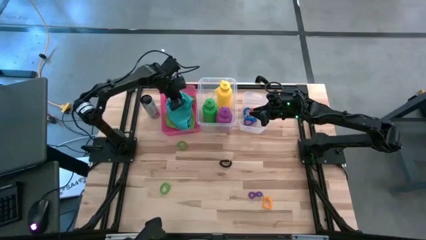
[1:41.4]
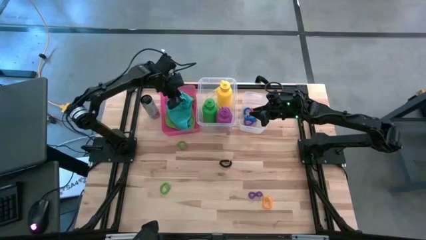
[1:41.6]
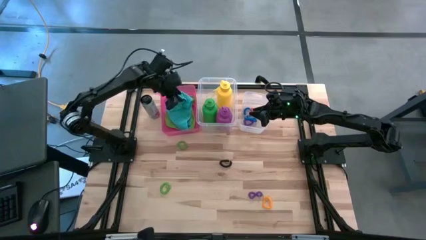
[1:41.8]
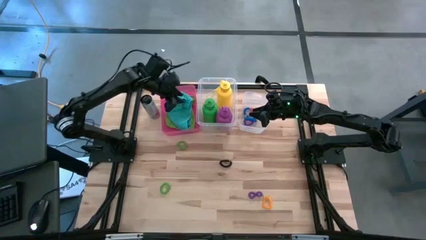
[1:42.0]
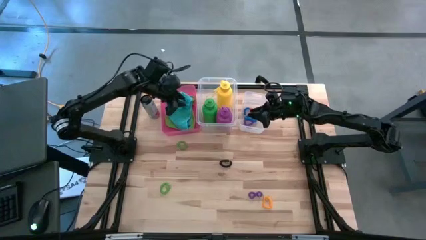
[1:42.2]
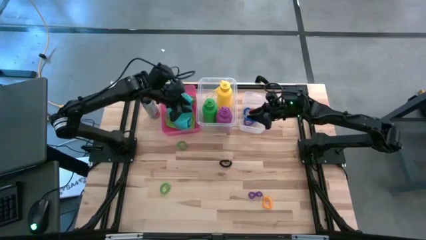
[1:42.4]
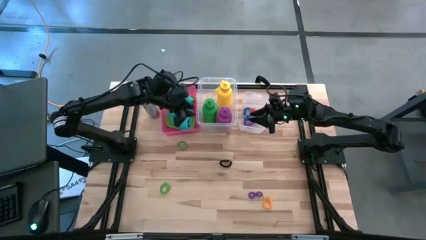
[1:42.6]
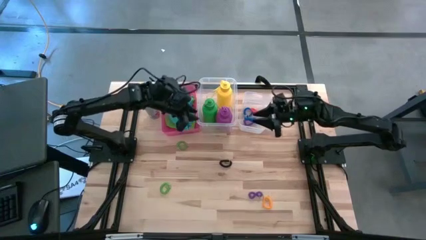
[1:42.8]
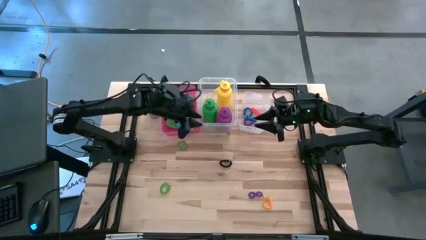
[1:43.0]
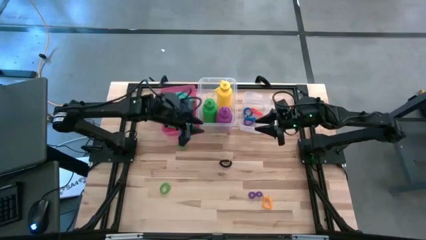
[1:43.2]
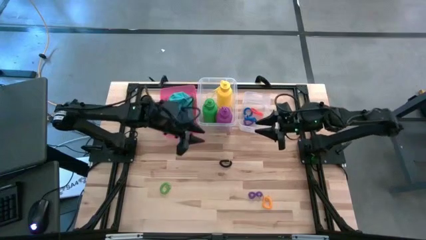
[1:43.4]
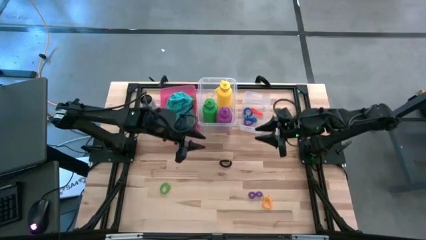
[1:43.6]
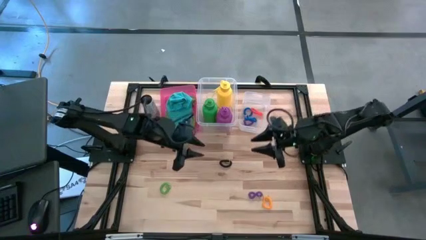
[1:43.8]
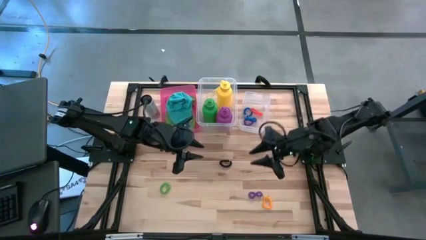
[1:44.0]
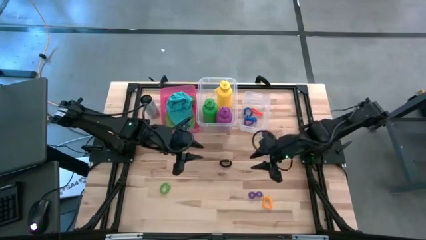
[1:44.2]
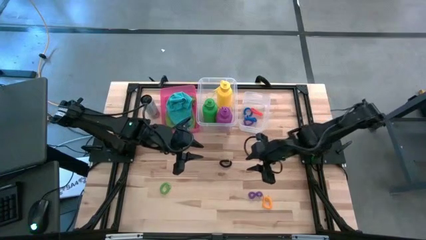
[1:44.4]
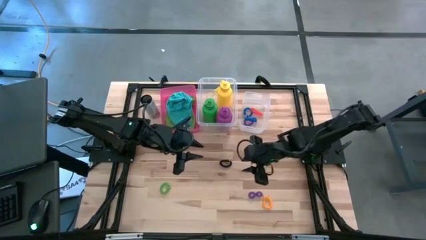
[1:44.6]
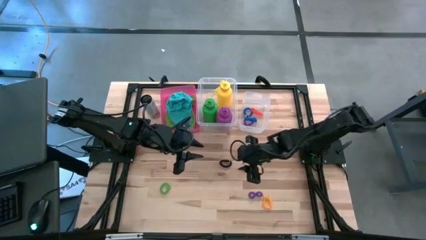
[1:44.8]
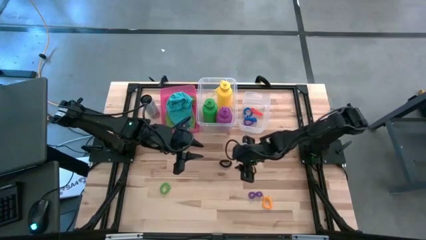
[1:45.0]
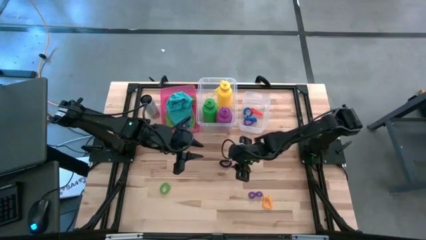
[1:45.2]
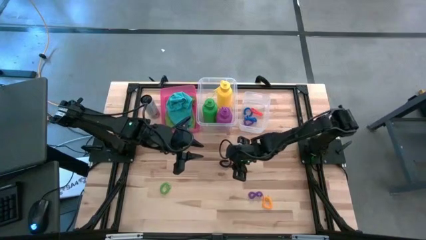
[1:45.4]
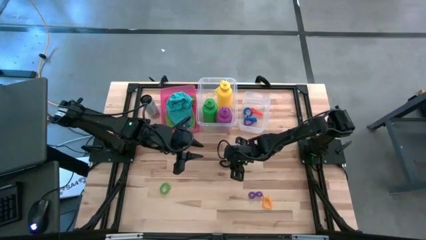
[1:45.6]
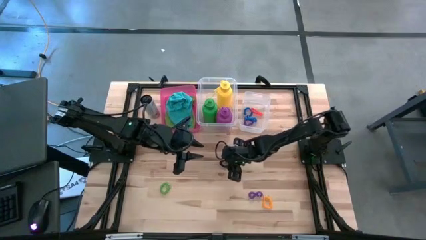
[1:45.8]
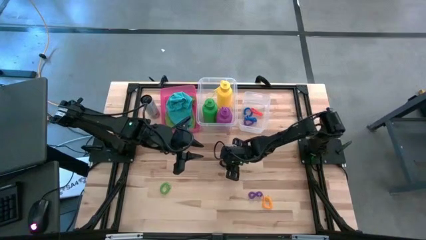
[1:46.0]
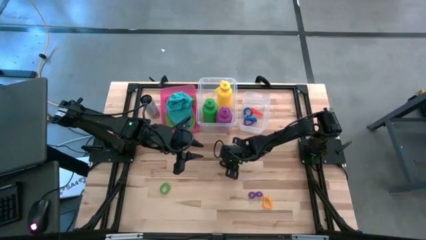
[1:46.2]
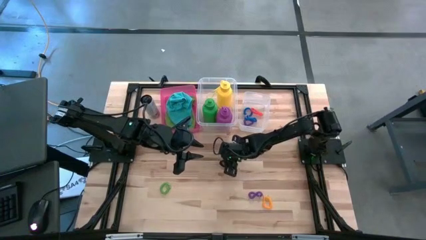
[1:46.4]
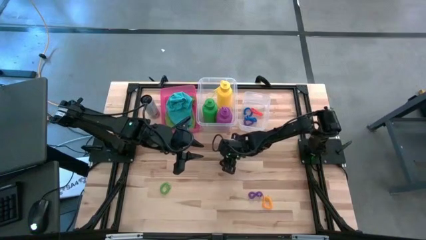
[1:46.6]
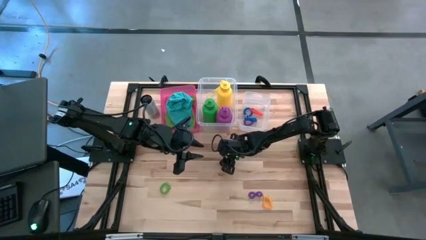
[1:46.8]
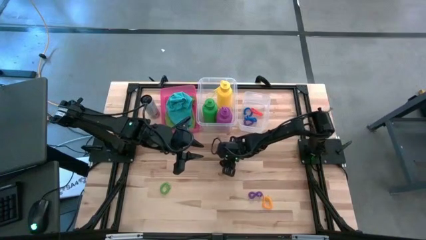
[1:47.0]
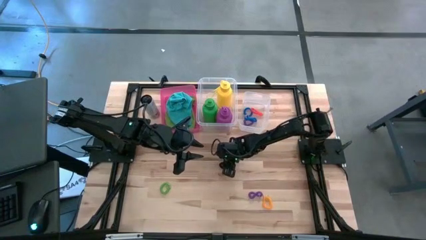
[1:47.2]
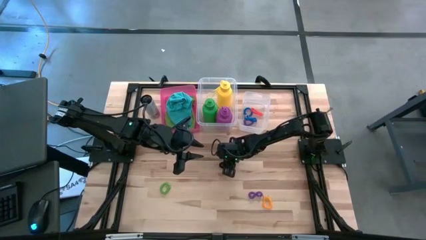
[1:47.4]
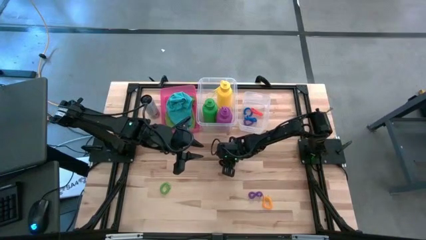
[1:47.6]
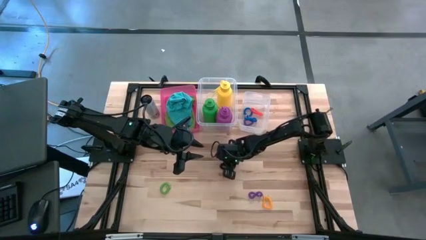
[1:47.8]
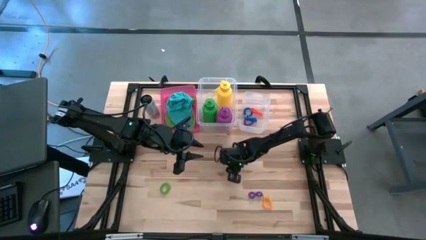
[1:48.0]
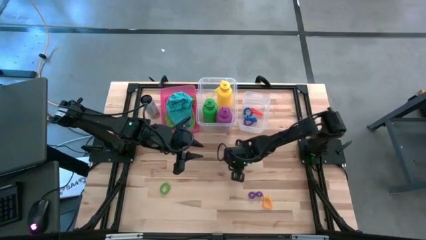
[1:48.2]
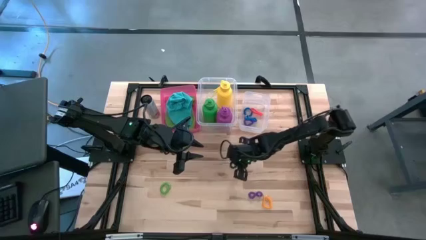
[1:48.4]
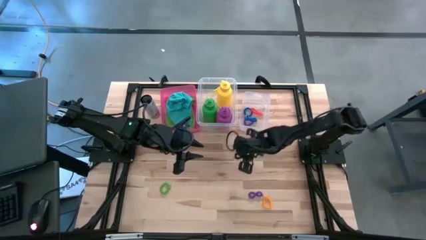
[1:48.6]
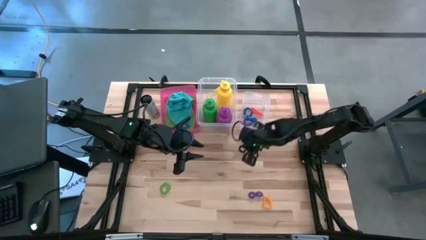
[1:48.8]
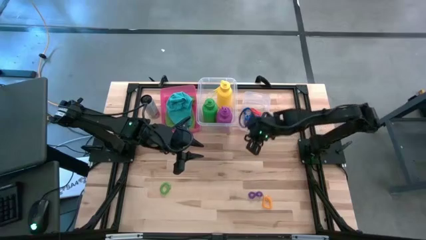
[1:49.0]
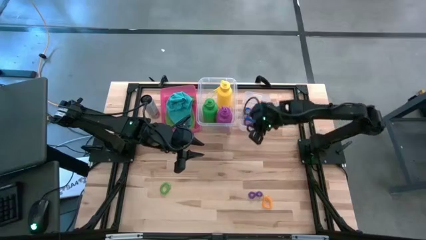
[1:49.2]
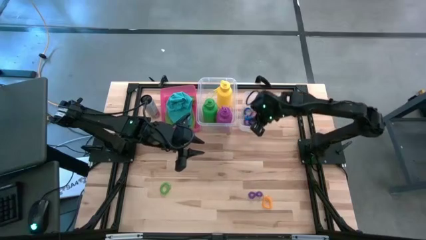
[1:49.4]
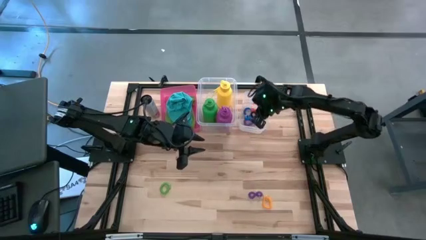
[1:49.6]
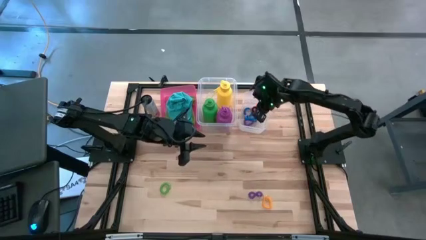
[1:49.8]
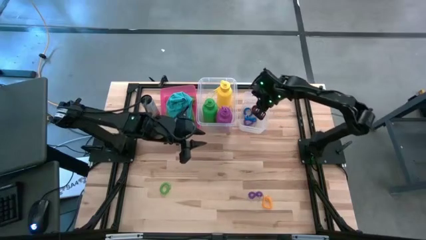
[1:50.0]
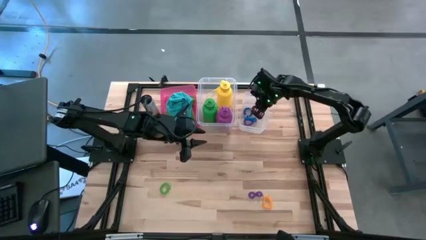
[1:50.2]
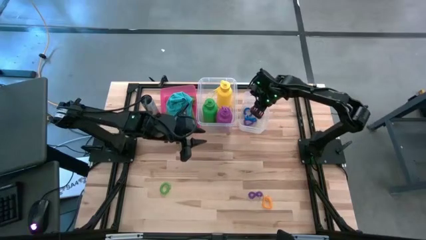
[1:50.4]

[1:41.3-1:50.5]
Task: Pick & Place Sports Items
Put the black spring keychain into the right transparent bin

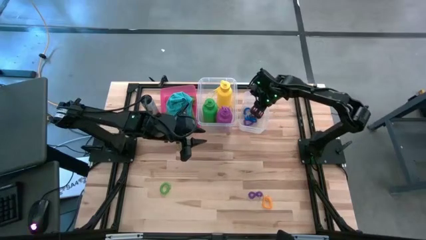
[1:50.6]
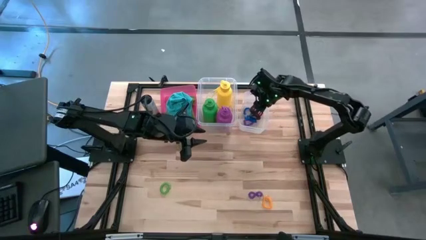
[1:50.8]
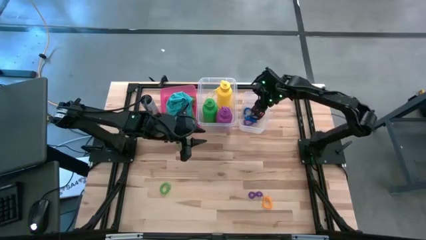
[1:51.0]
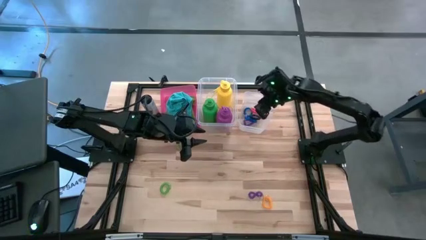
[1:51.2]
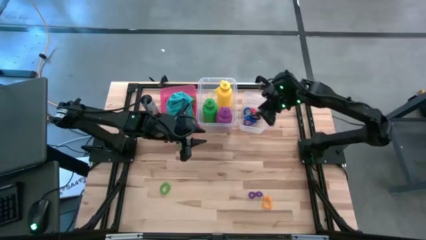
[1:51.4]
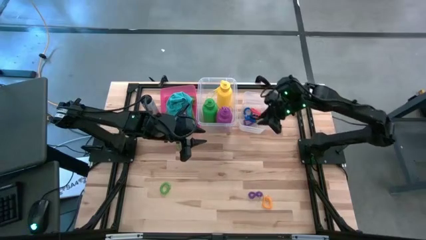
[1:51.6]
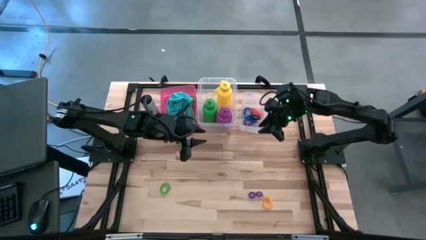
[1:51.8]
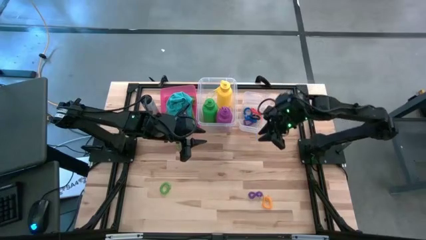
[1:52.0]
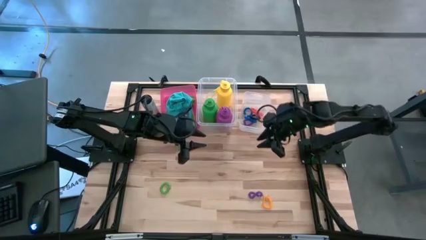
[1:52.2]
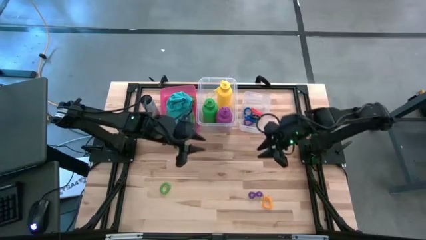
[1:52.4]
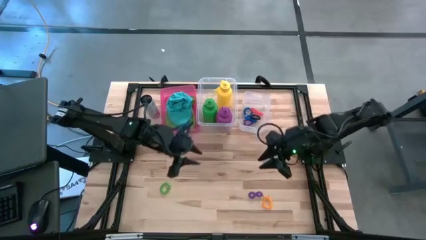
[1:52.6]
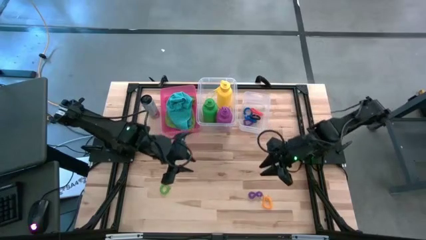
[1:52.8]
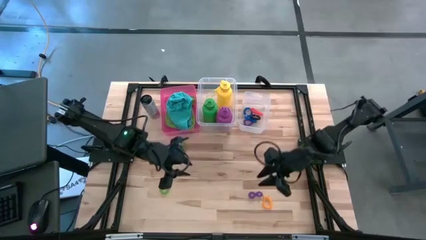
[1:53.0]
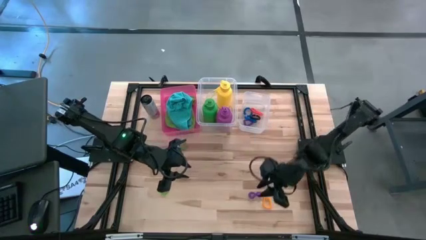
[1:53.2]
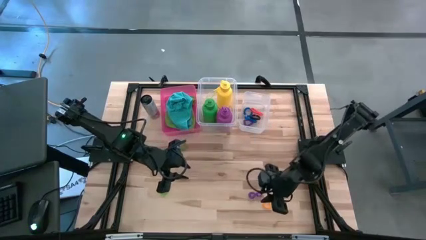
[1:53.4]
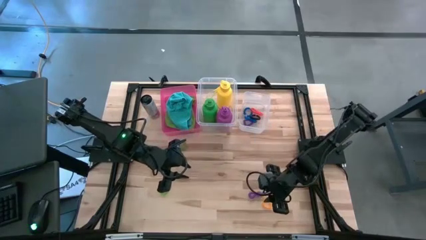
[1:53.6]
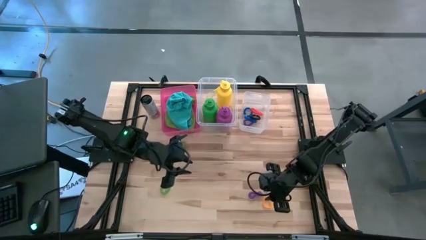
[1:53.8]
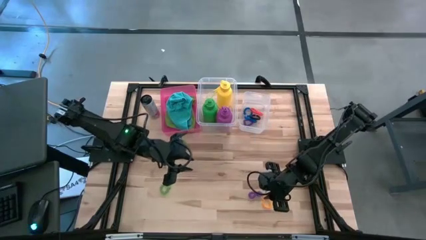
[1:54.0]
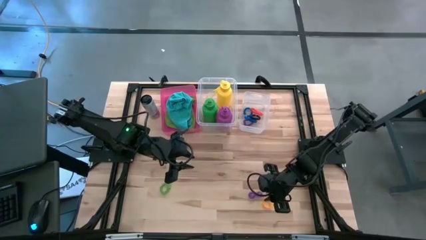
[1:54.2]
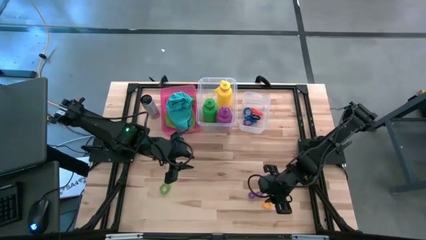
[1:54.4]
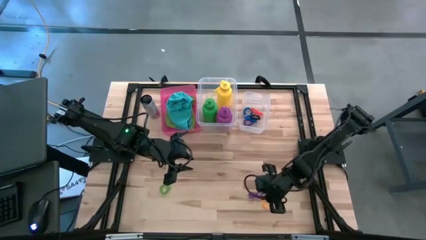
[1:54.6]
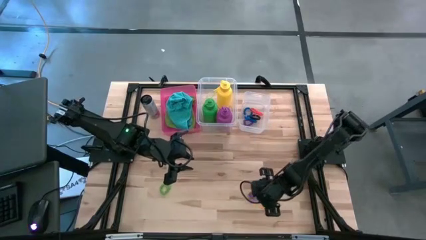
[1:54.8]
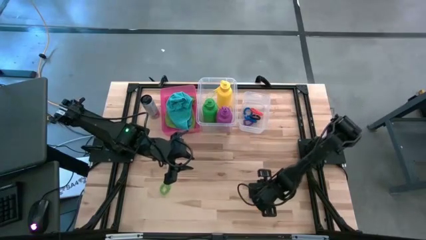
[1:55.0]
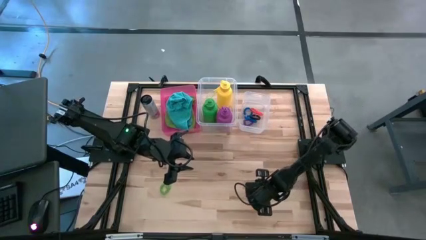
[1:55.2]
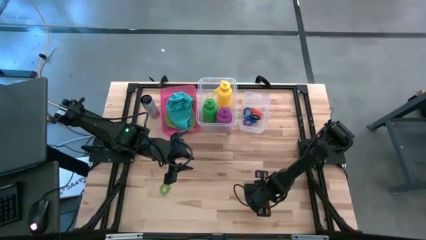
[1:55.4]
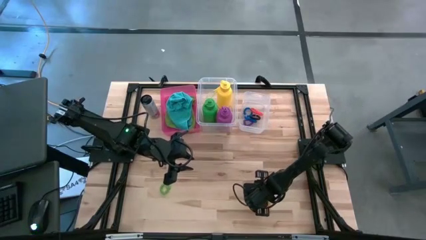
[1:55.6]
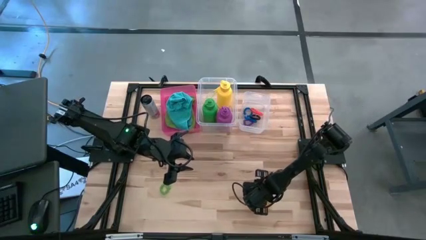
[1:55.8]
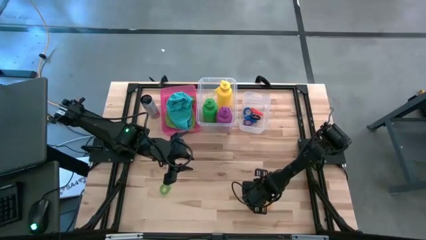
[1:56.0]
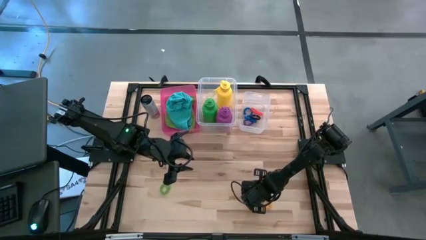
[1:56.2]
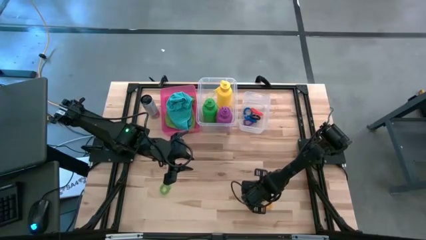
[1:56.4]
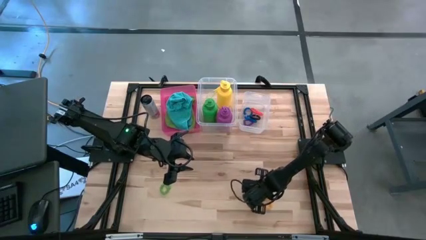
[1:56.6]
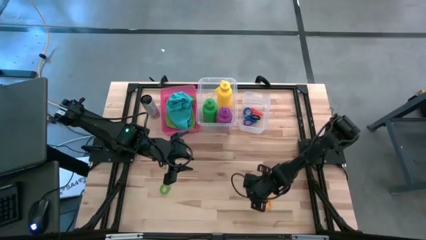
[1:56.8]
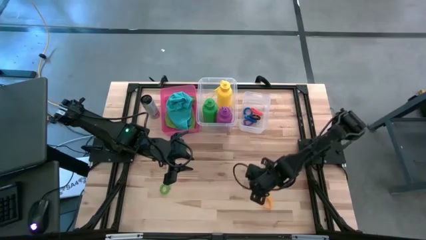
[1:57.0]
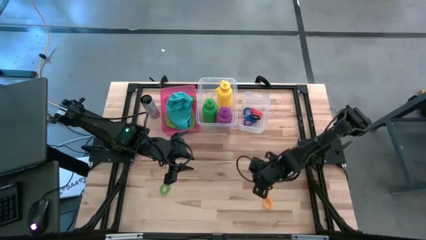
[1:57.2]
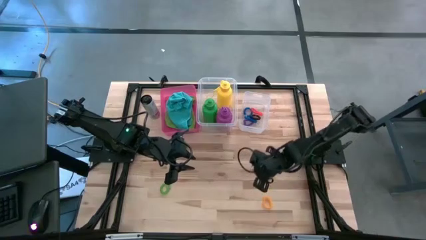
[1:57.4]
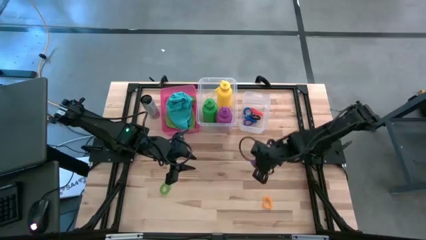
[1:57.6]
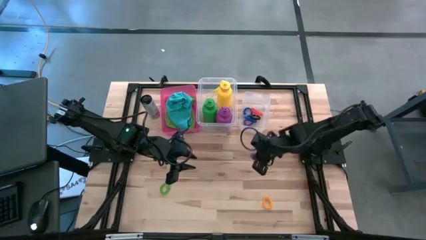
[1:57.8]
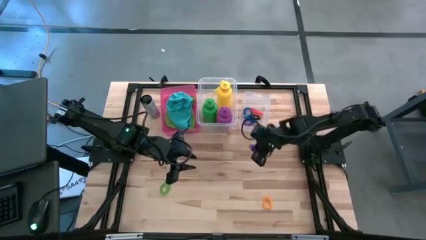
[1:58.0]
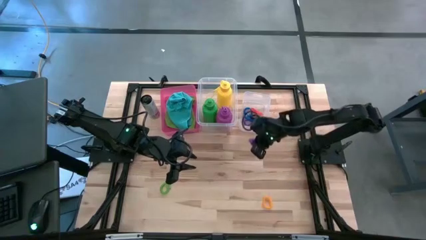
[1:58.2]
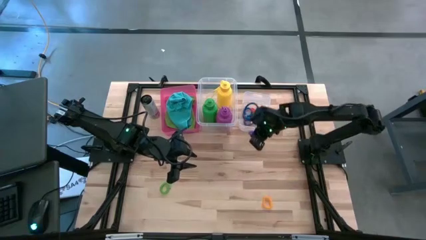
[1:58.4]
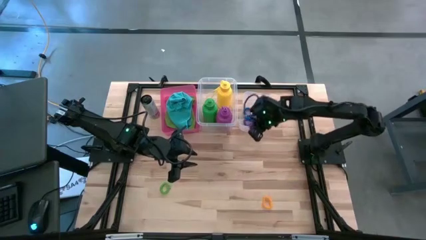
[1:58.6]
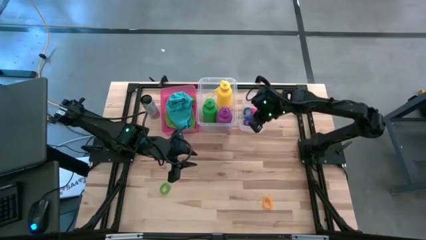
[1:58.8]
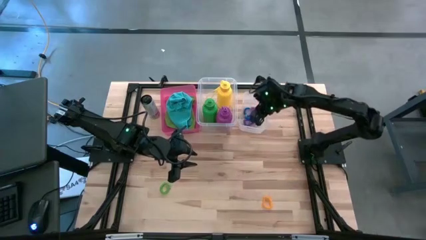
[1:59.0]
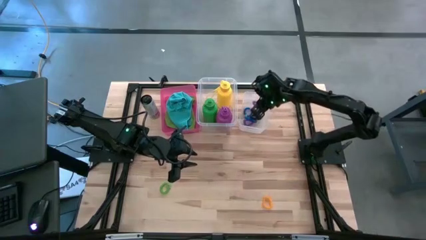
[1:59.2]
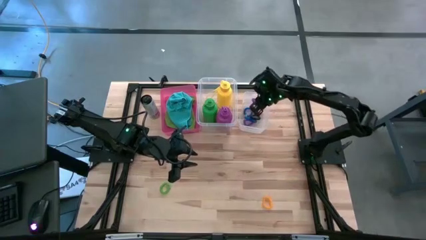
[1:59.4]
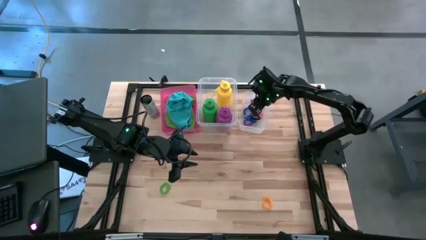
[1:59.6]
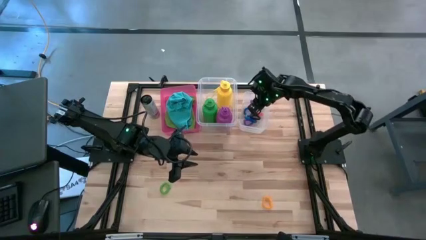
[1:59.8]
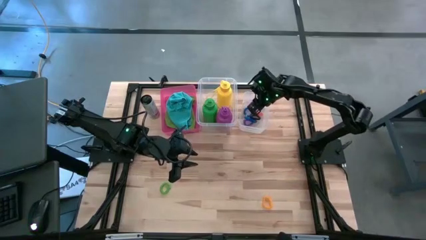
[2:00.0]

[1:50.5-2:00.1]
Put the purple spring keychain into the right transparent bin
